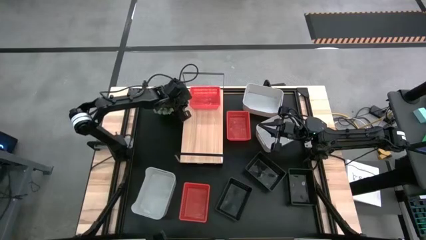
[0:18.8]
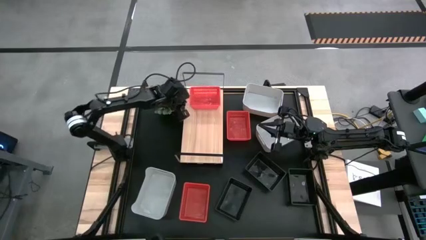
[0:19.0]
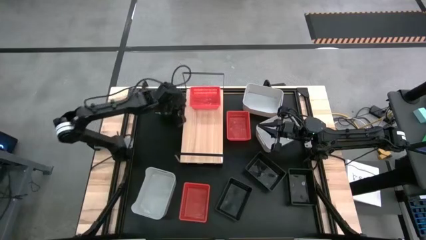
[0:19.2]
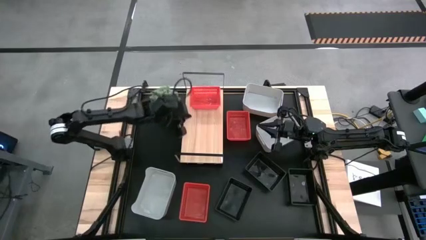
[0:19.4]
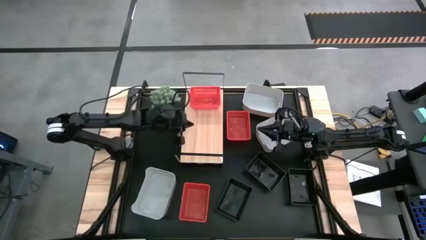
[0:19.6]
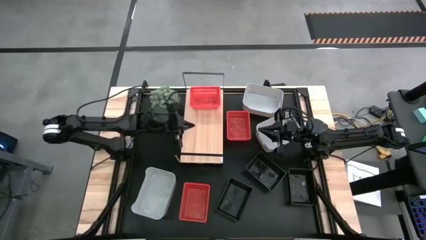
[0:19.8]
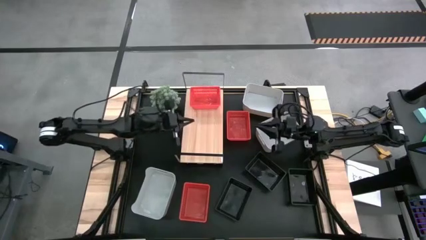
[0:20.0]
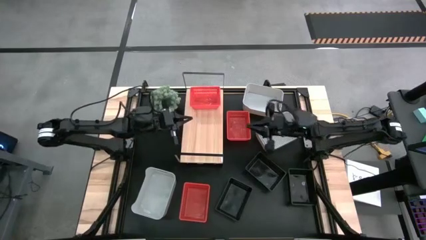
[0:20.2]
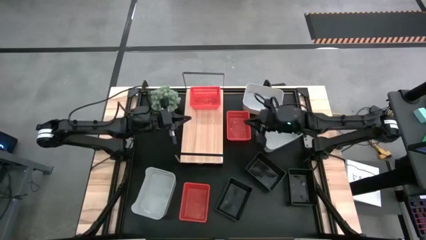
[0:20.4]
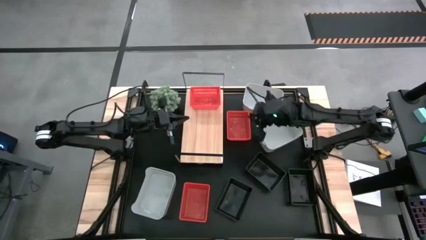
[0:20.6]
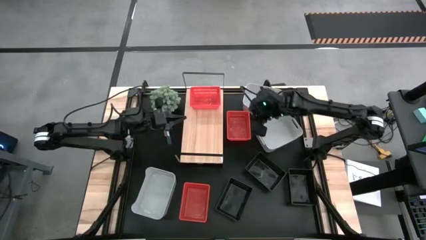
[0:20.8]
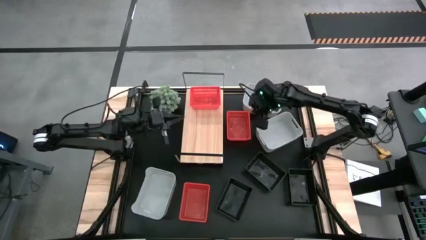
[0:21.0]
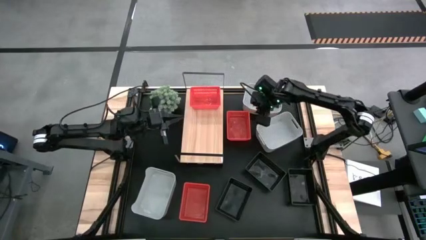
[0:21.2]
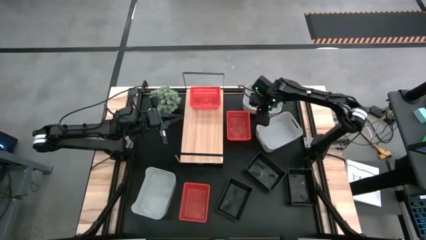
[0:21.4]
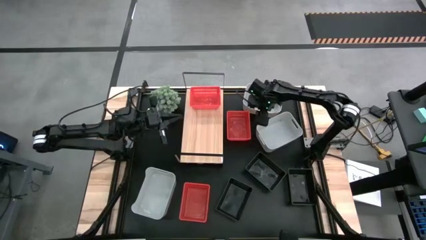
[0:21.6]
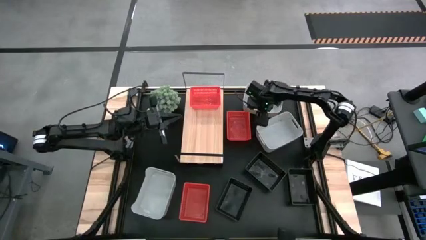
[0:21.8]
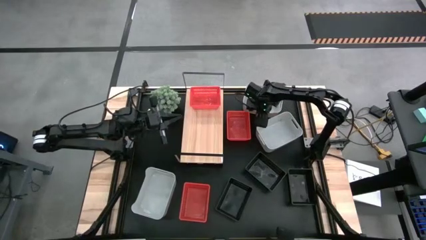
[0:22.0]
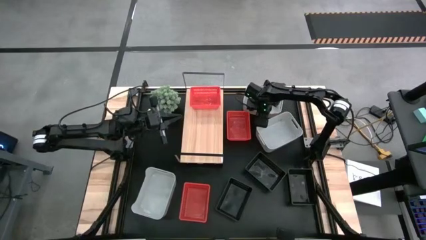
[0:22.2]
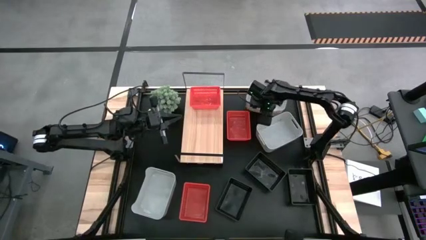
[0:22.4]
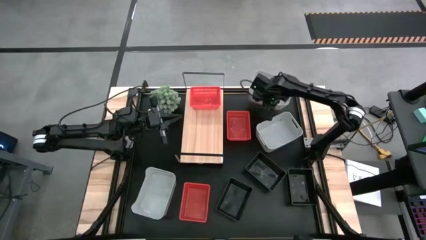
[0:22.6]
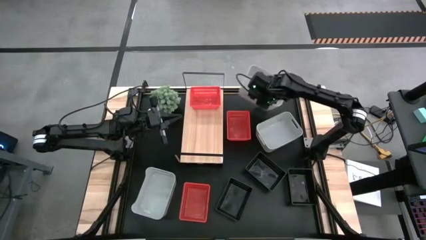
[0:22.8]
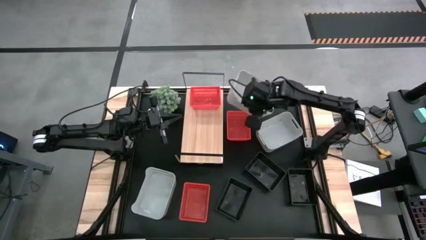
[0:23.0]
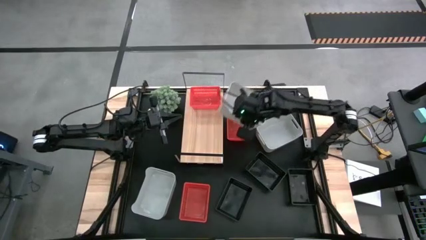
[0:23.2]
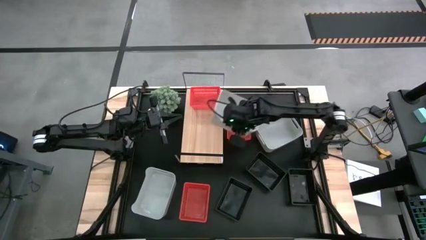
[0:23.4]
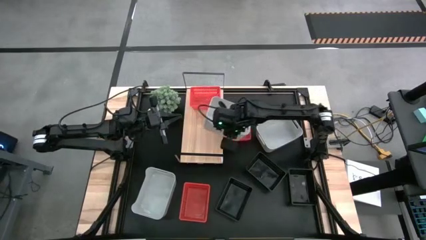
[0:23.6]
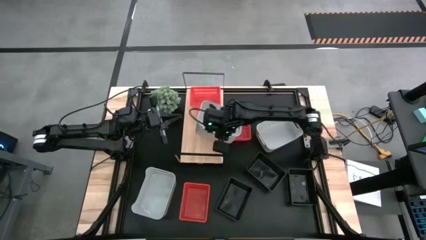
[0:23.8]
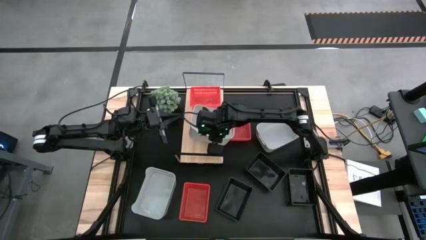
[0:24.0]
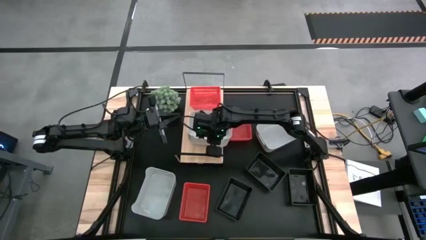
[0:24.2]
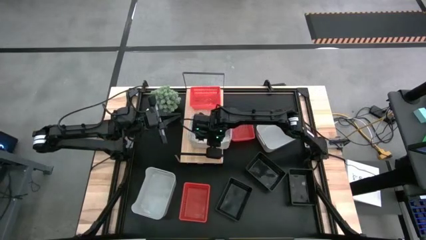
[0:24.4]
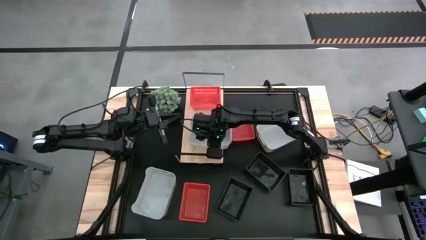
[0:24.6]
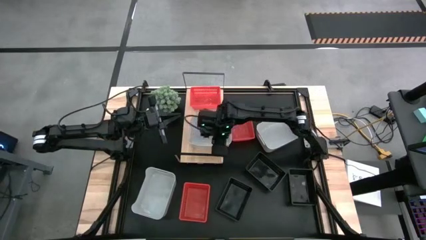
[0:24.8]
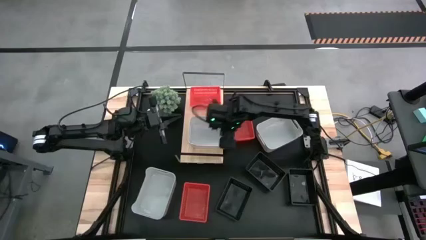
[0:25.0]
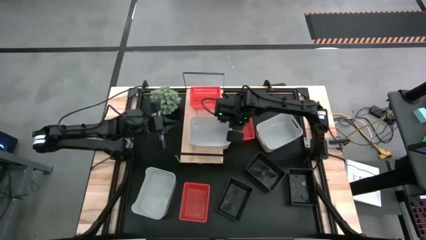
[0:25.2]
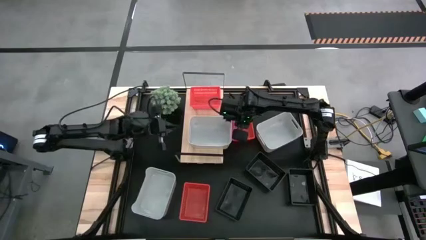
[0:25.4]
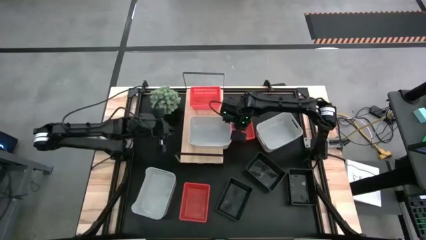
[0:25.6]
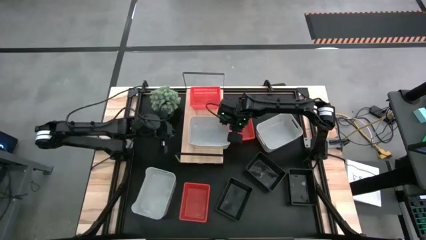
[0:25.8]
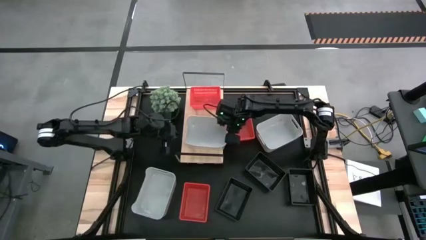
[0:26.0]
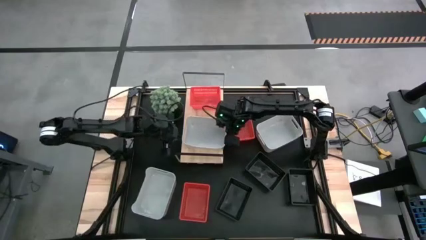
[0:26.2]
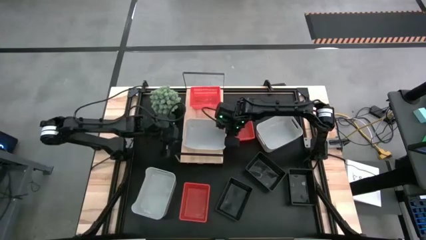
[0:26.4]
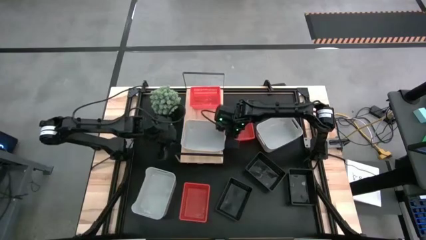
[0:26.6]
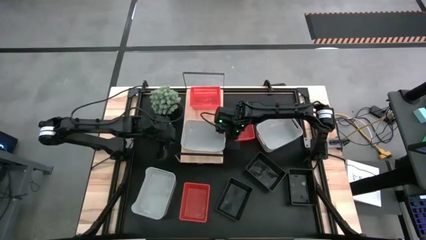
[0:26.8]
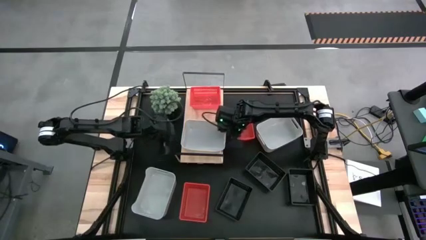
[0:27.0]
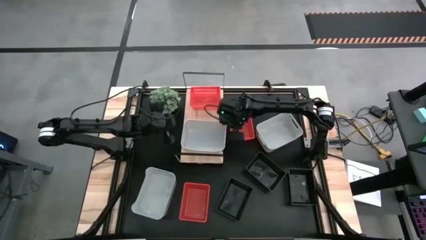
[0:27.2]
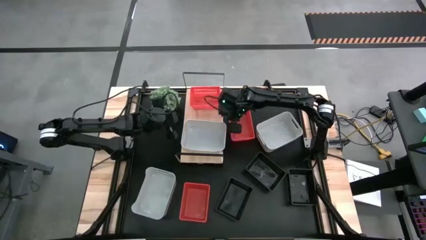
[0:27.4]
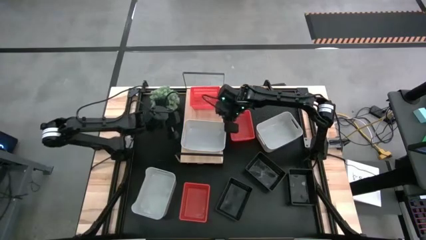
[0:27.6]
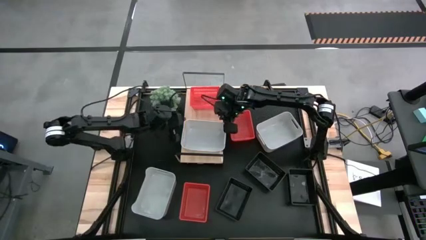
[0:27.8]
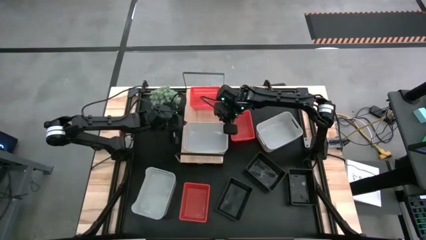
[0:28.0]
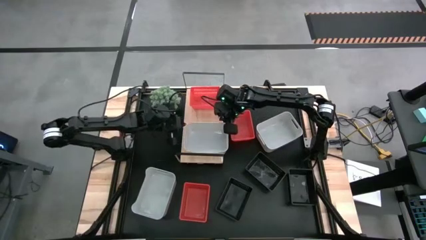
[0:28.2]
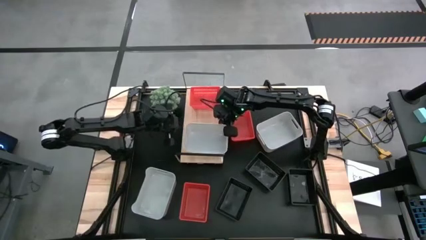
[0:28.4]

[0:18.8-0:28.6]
Task: Stack baskets on shelf by color
Put the top gray bin on the shelf

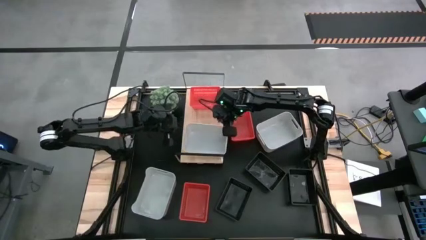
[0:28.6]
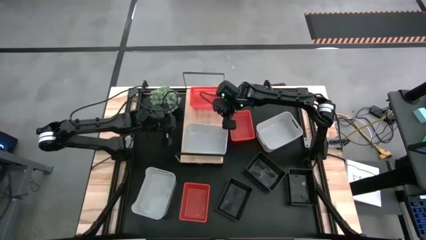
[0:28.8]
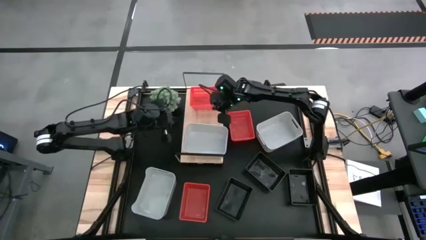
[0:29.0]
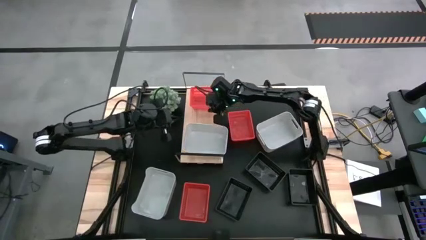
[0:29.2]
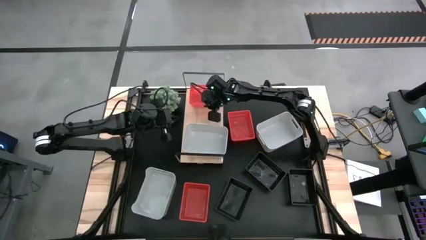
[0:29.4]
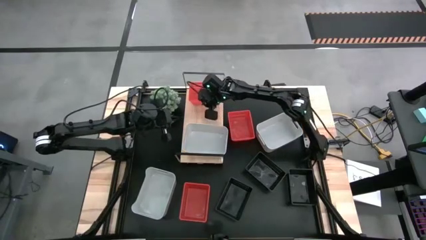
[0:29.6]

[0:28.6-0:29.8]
Adjust the red bin on the shelf

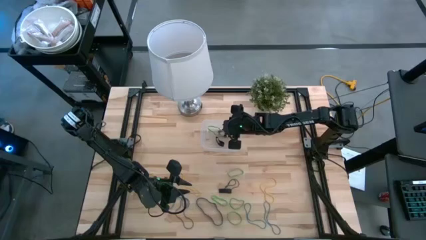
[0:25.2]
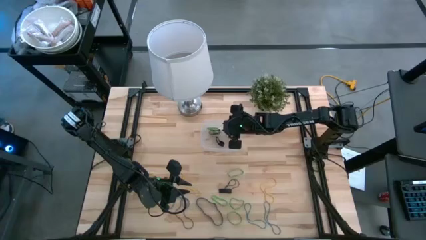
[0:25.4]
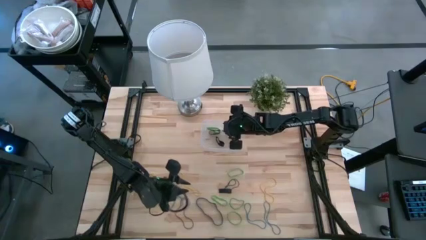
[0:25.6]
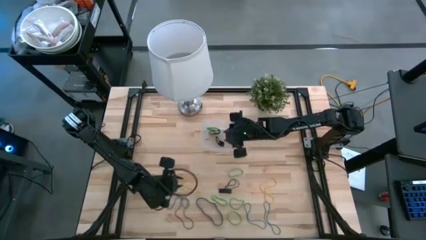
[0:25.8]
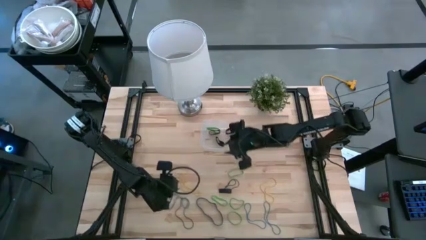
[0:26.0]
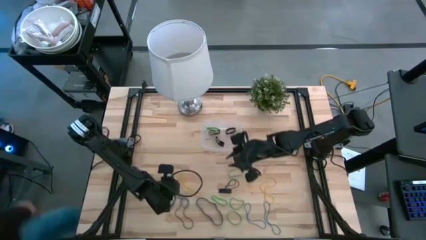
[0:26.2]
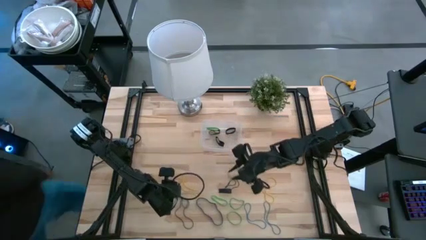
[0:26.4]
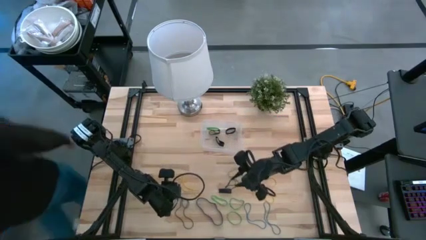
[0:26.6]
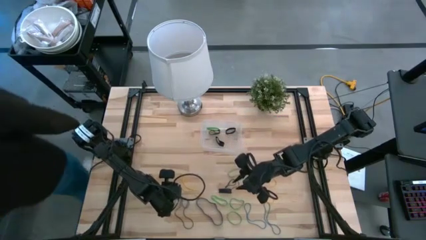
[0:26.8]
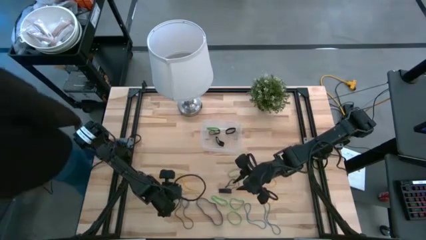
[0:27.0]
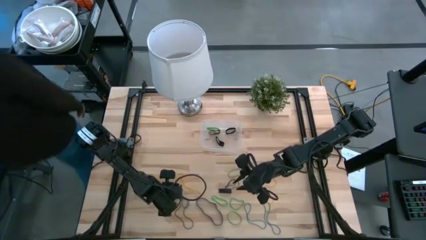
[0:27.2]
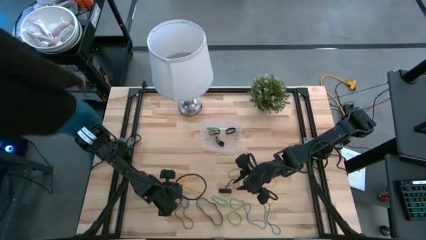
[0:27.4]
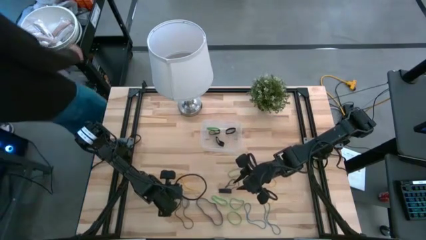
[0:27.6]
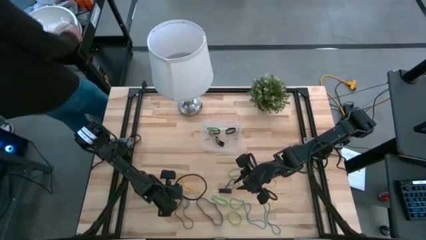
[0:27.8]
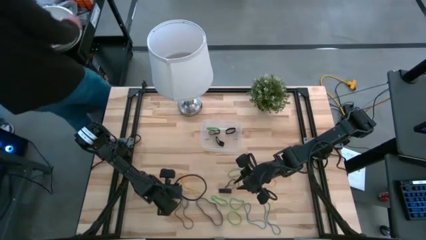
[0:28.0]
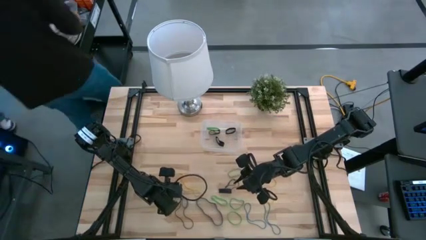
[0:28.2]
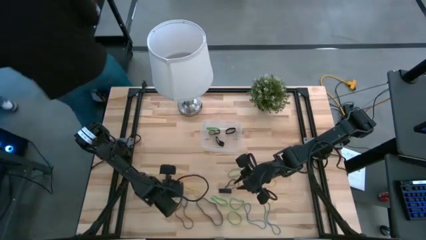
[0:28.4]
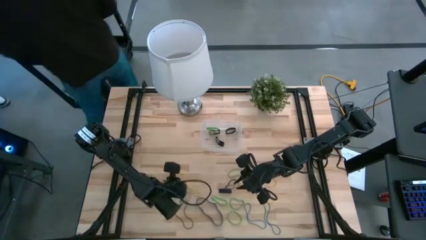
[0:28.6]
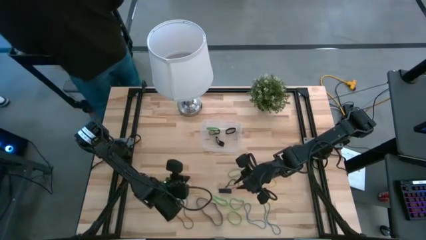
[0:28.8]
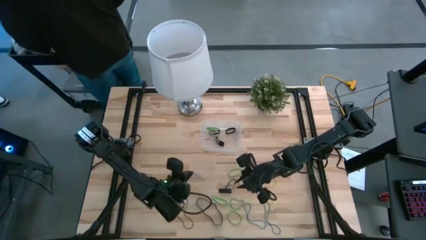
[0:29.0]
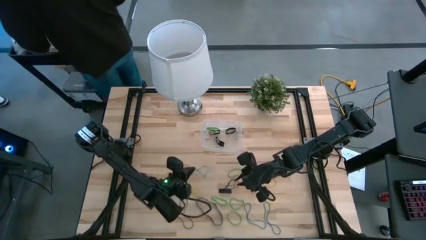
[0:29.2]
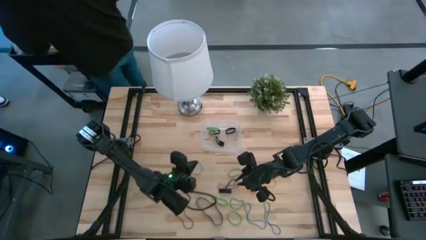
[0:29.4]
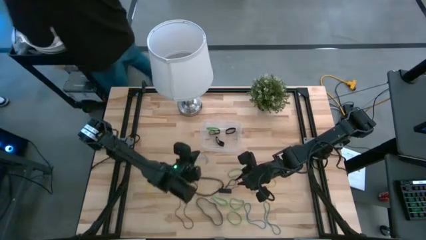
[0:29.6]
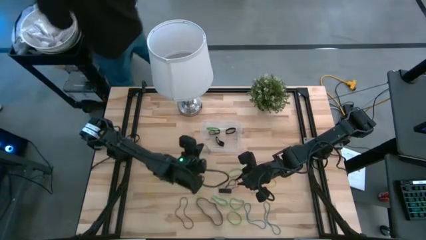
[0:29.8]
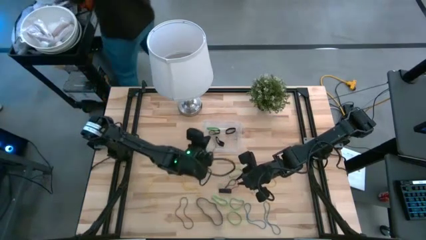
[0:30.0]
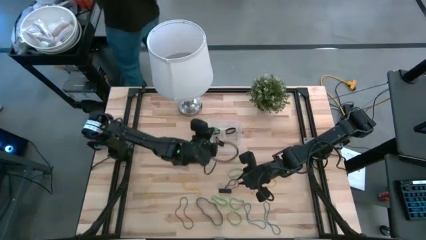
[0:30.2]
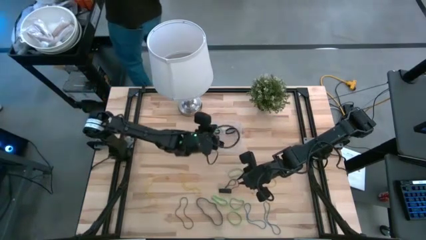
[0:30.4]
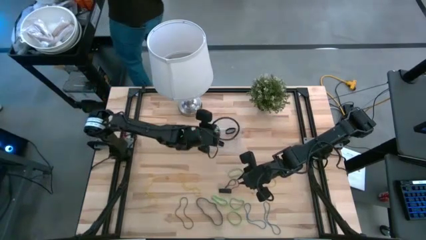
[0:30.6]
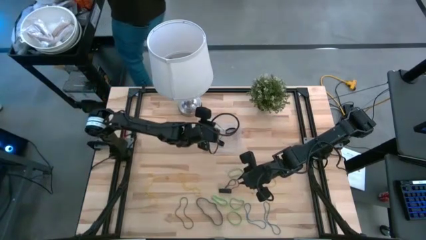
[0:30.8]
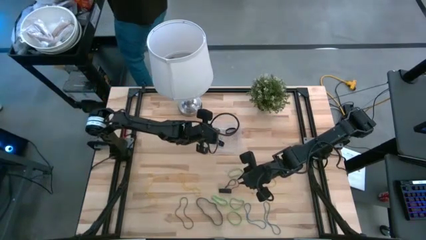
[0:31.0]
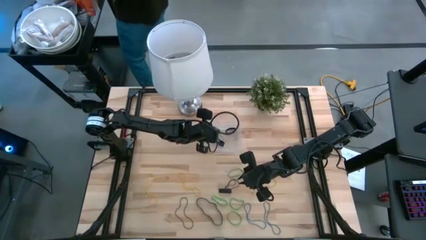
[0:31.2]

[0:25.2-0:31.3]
Task: Pick and place rubber bands into bin
Put the blue rubber band into the transparent bin
